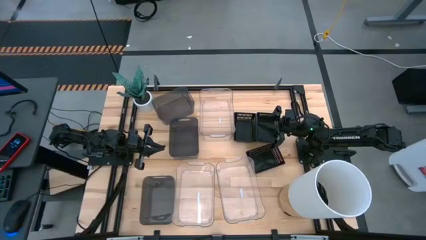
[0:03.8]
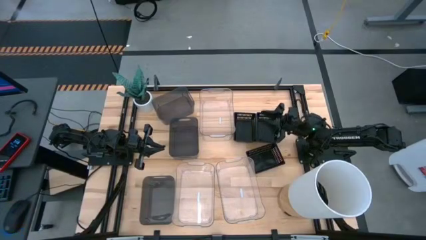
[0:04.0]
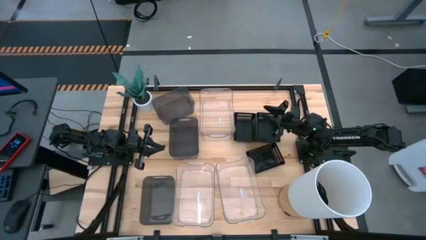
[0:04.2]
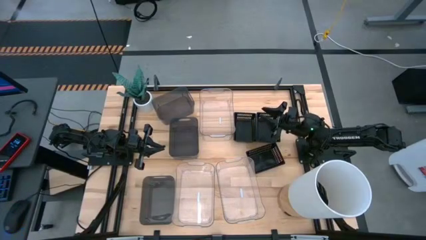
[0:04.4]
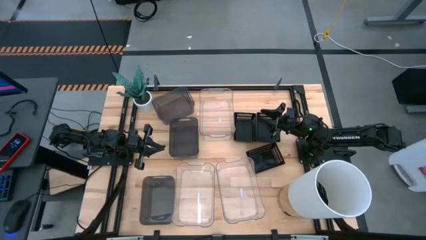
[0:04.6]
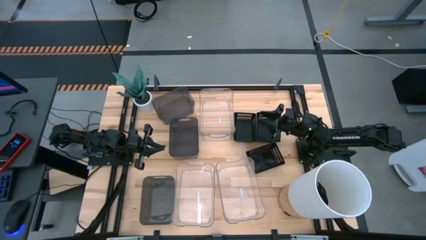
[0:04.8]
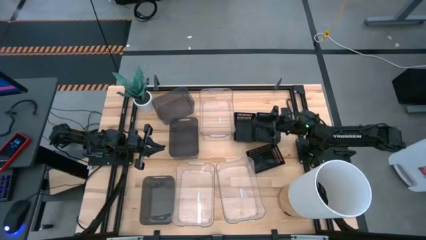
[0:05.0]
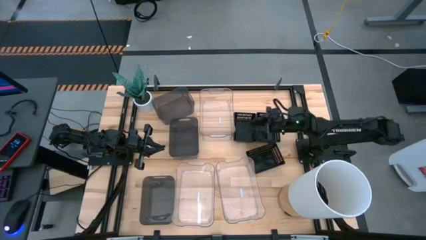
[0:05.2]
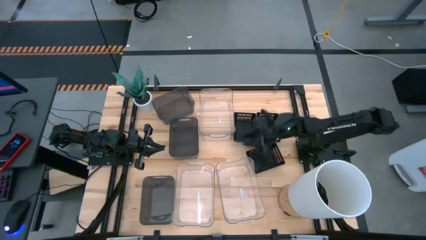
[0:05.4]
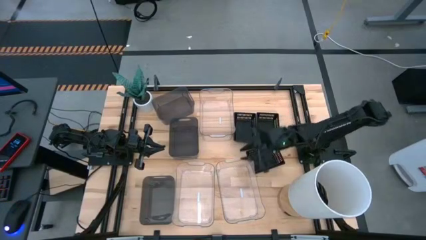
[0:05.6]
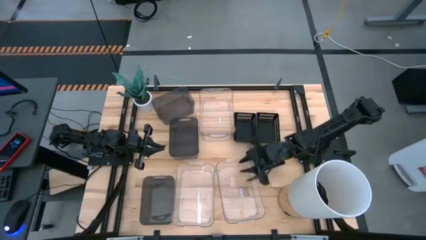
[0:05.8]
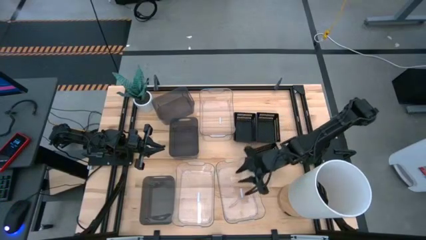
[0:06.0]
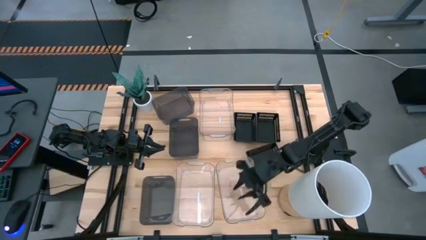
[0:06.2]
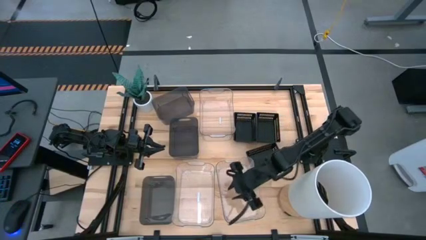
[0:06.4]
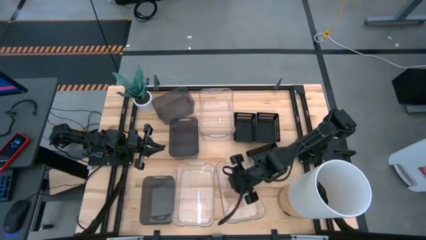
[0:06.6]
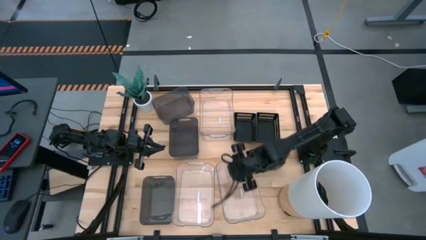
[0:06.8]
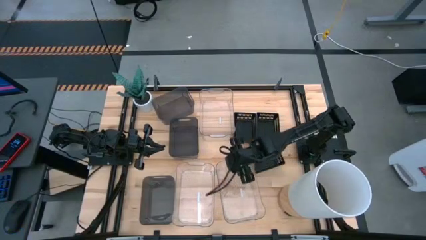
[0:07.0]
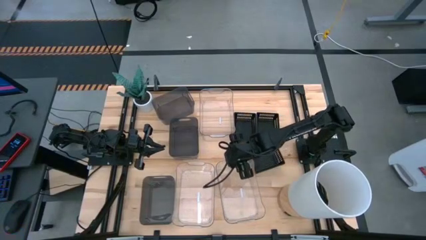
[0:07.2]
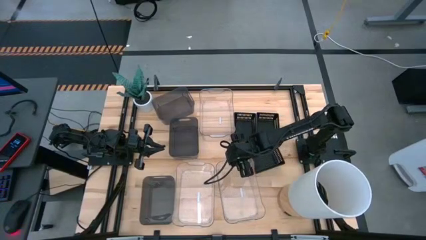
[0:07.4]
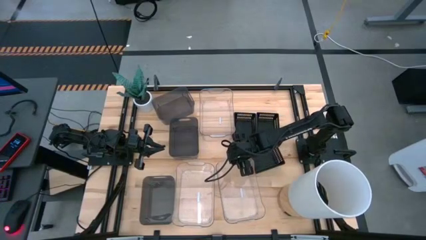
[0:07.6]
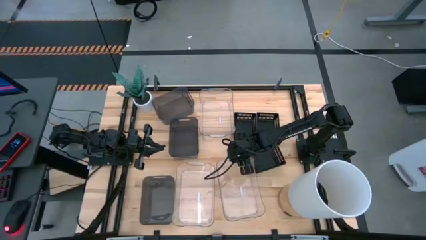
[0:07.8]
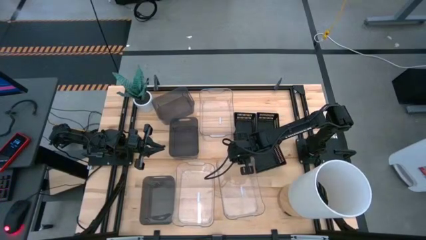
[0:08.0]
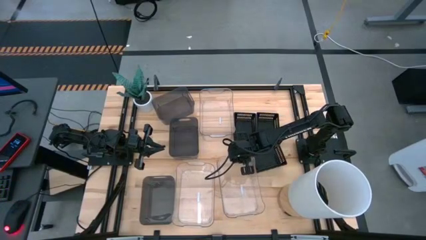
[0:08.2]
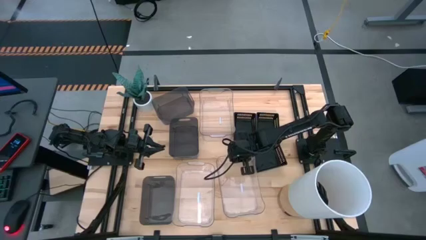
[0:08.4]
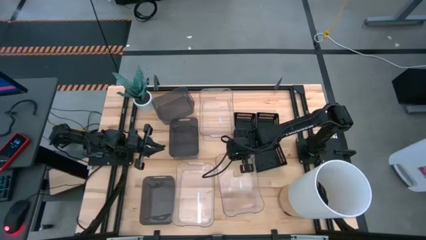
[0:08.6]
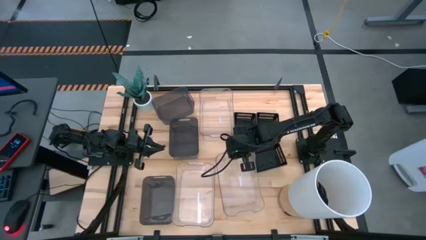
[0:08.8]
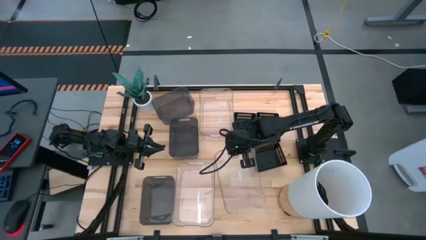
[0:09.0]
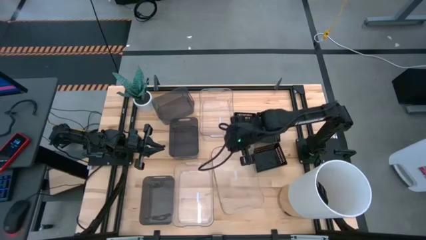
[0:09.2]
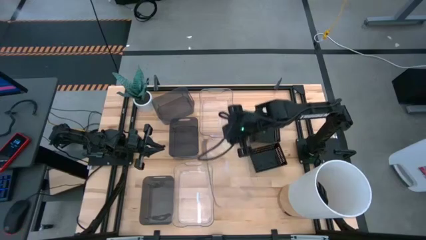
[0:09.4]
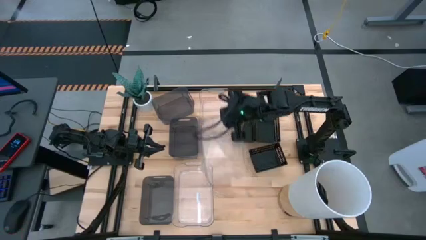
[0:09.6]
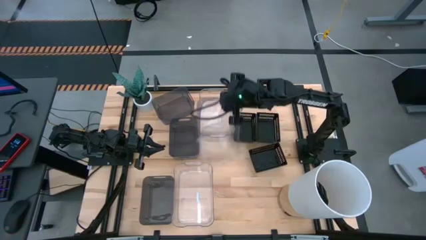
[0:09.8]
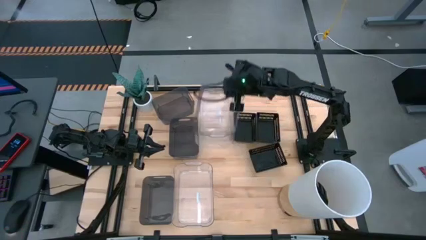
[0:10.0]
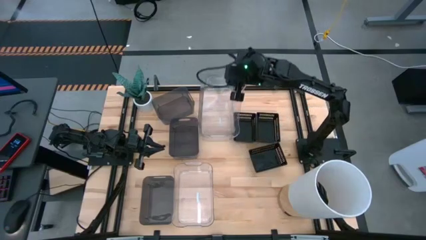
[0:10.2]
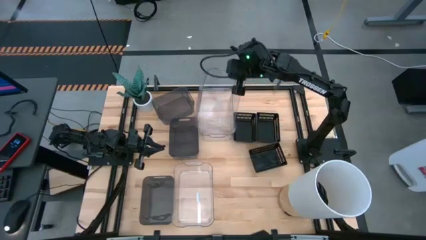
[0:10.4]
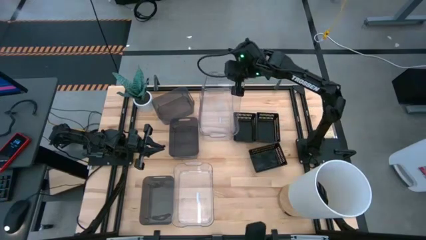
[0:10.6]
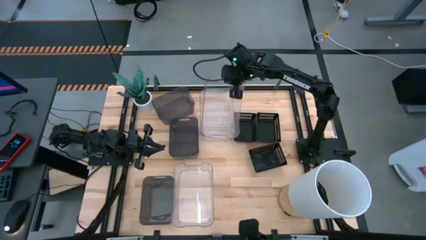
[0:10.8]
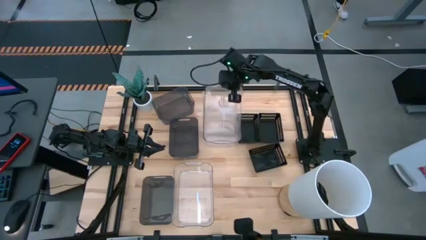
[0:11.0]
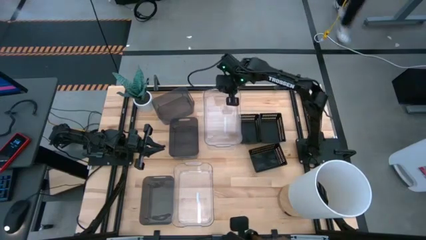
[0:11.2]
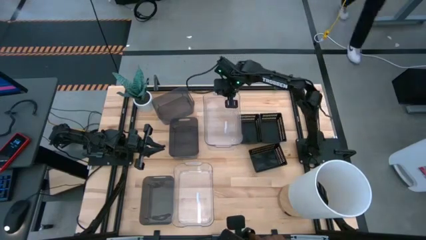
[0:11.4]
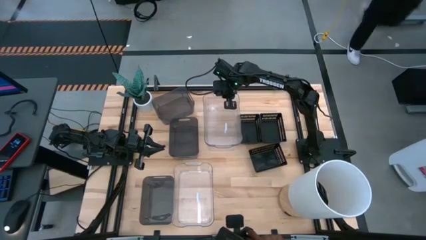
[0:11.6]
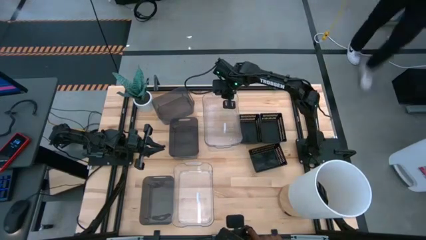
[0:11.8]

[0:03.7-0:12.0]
Stack the bottom right transparent bin on the transparent bin

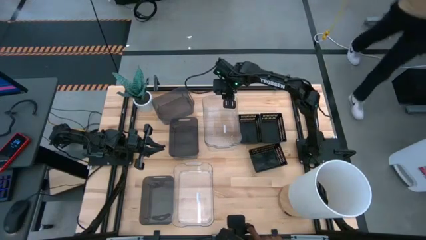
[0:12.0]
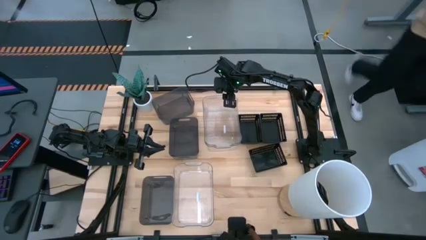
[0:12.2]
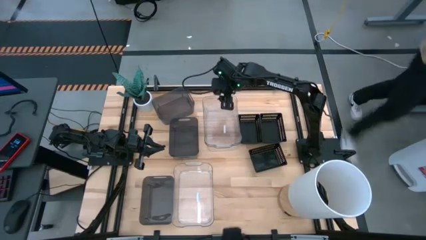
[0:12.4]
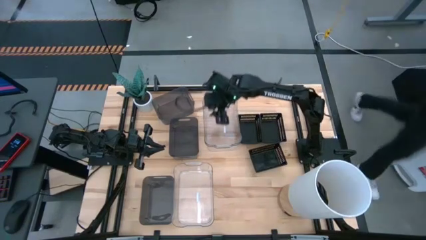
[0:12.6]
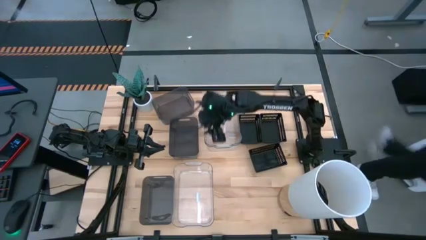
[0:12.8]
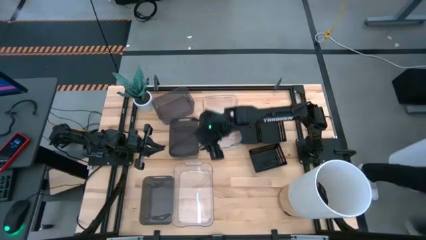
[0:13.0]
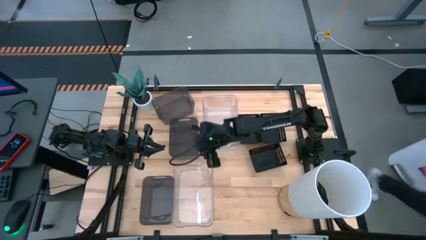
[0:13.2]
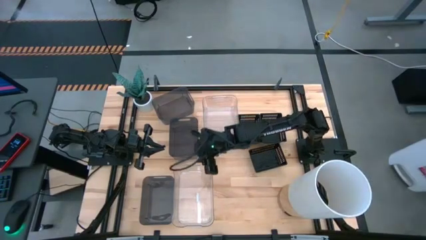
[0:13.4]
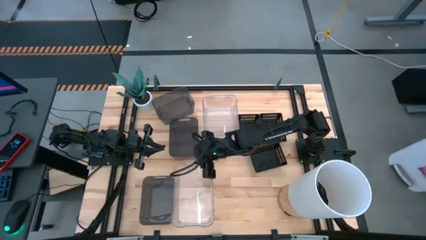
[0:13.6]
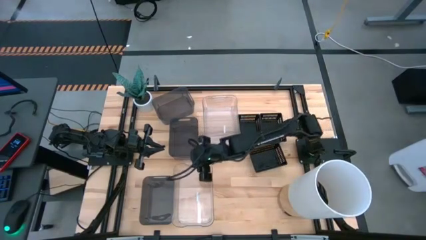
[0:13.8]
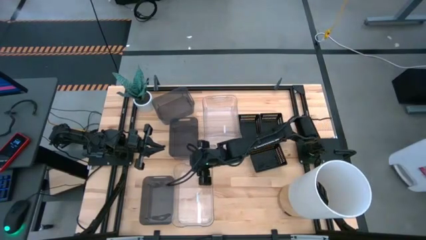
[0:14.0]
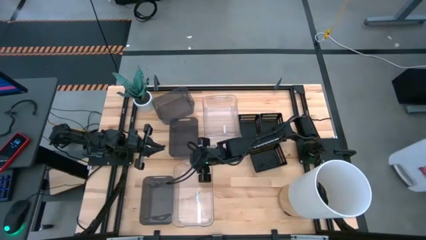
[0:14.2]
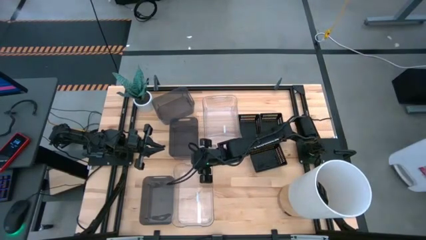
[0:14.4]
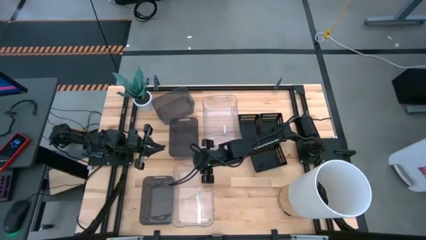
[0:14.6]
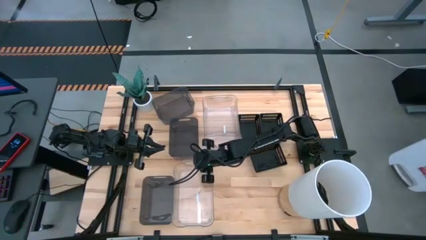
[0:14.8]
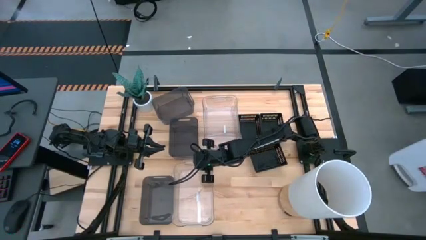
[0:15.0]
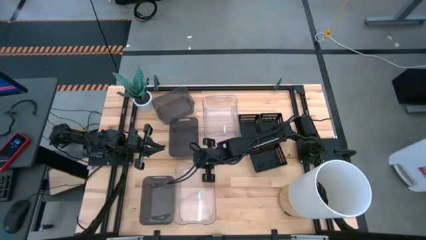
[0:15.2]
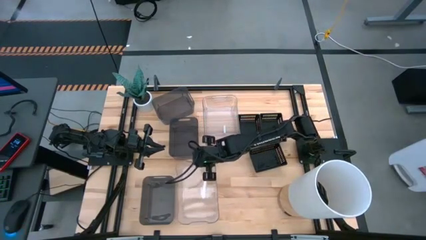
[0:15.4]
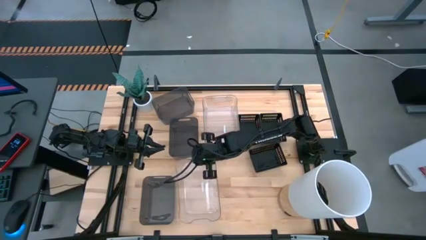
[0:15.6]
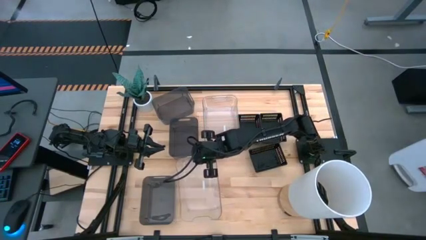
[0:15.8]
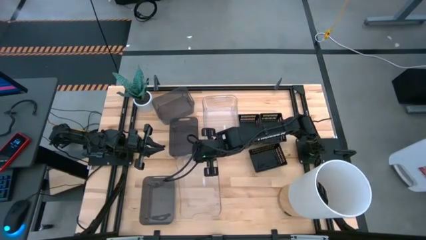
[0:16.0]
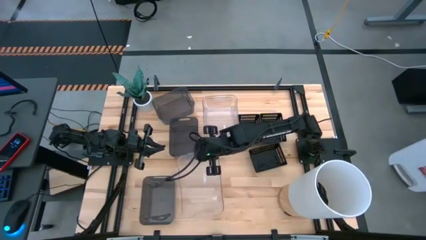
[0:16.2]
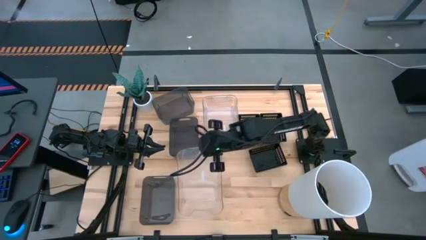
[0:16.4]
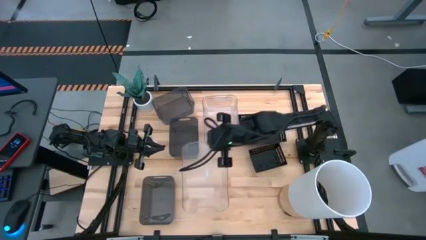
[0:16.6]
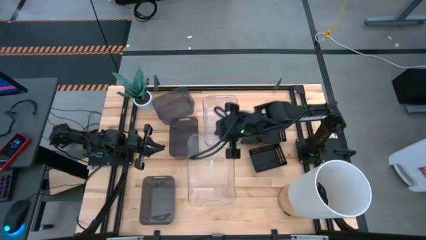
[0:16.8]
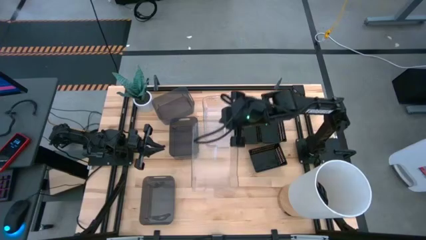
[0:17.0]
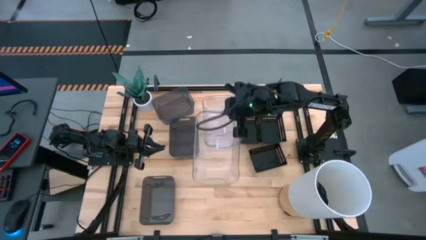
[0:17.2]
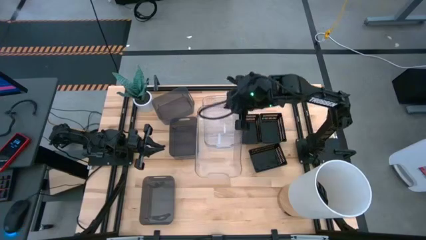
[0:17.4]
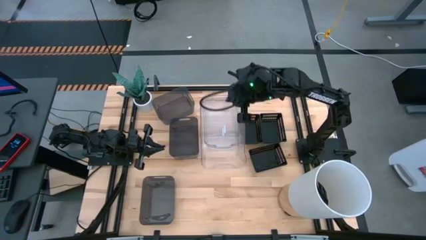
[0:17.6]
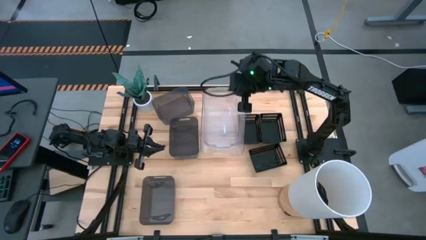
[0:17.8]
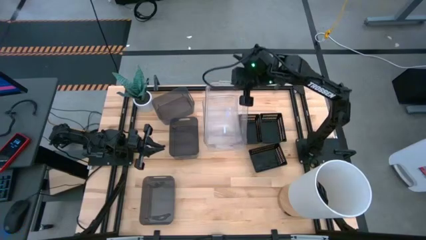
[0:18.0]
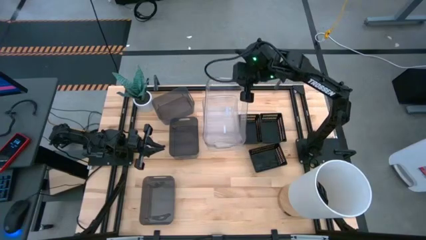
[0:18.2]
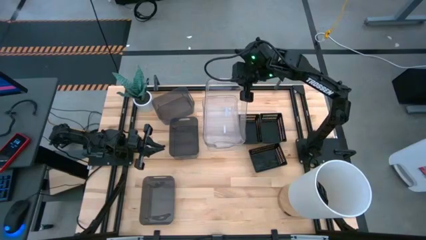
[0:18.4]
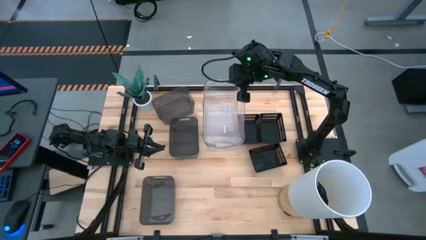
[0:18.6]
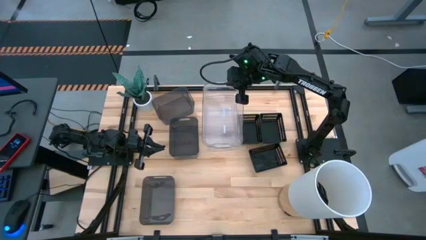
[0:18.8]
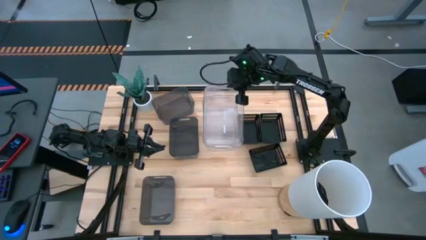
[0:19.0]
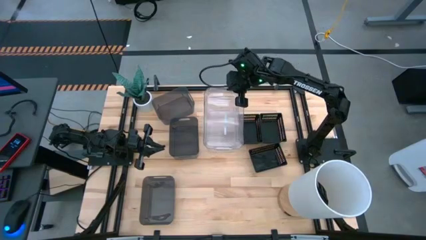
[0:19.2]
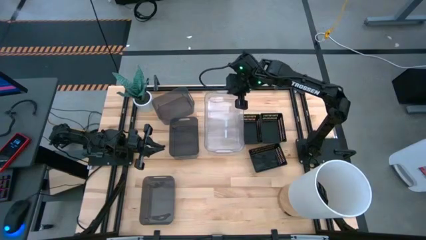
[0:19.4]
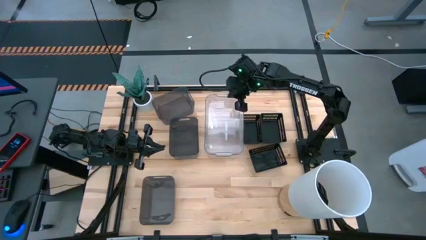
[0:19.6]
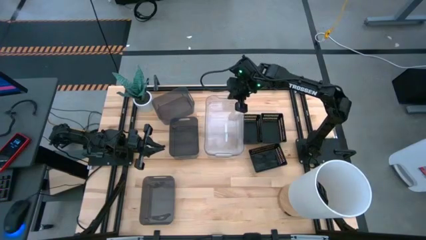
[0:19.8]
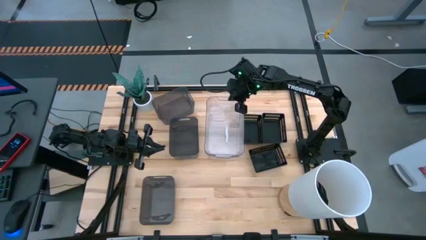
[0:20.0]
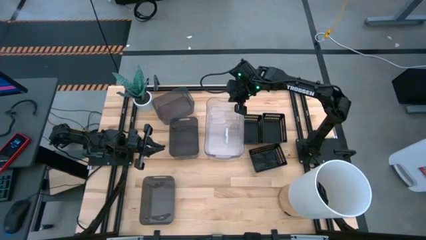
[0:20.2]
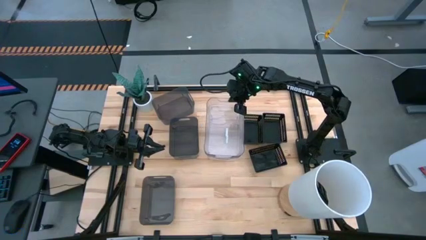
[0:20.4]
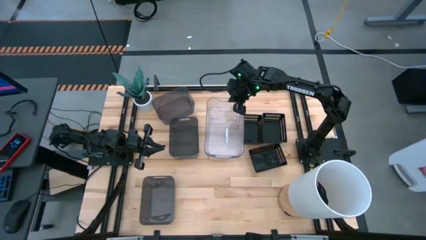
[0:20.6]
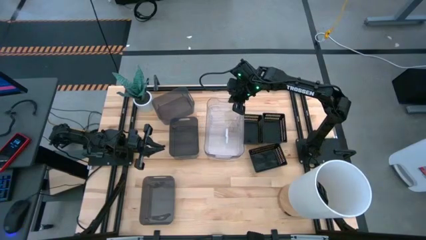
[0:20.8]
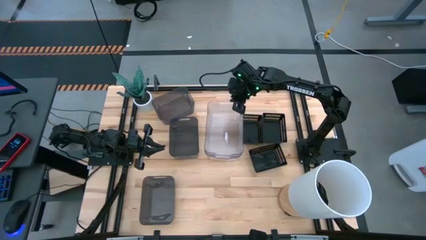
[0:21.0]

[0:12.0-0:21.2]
Stack the transparent bin on the transparent bin
